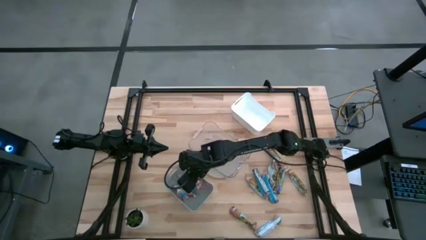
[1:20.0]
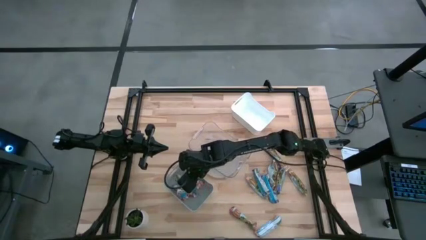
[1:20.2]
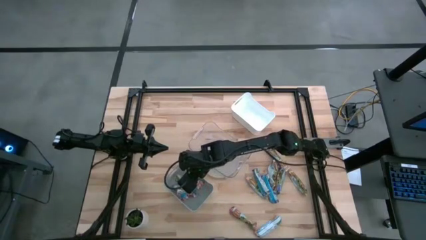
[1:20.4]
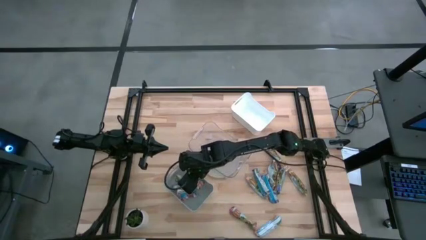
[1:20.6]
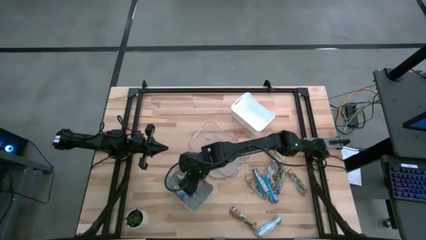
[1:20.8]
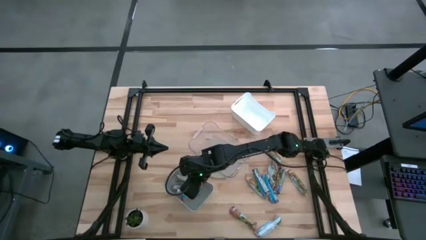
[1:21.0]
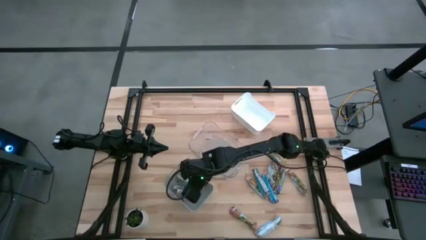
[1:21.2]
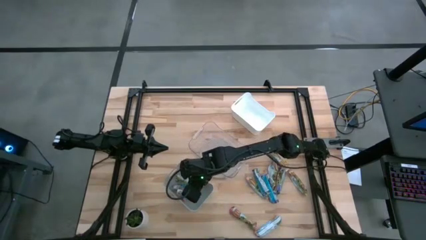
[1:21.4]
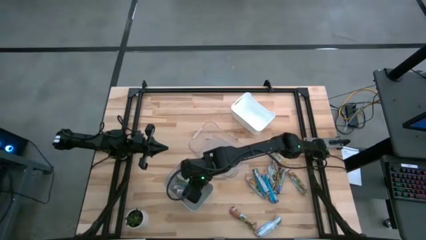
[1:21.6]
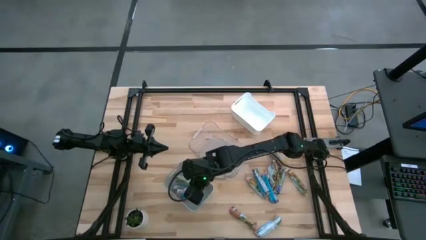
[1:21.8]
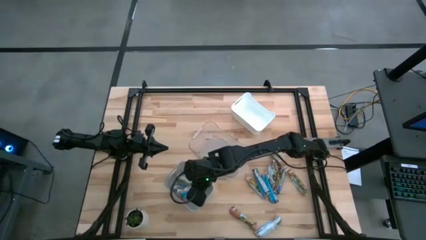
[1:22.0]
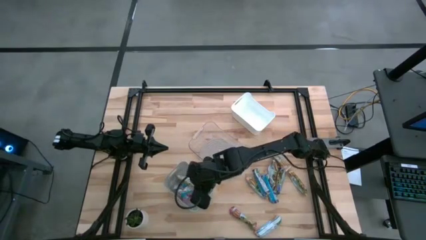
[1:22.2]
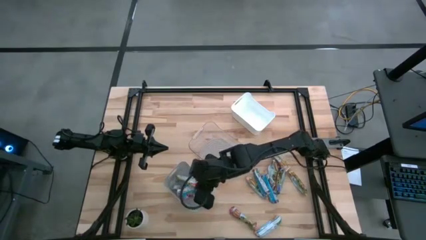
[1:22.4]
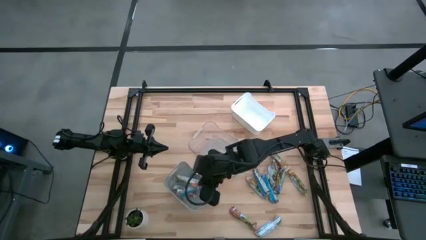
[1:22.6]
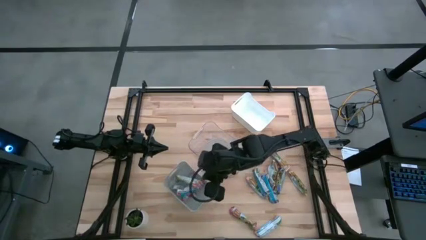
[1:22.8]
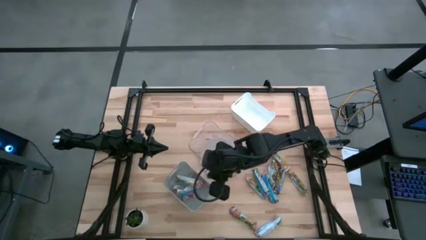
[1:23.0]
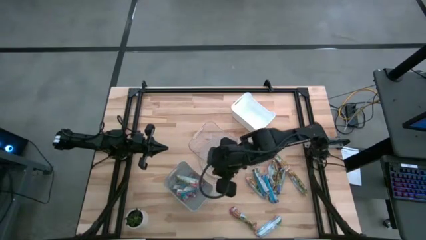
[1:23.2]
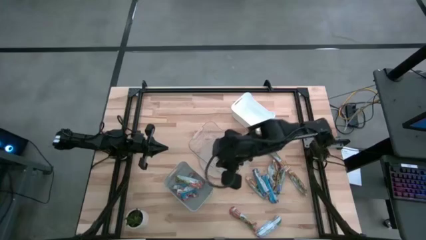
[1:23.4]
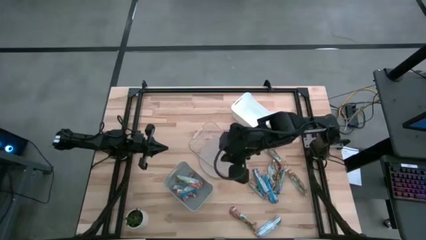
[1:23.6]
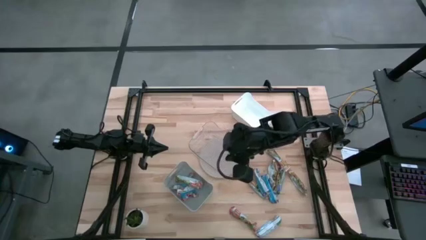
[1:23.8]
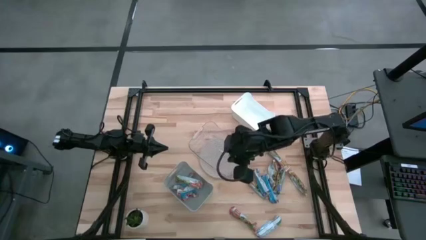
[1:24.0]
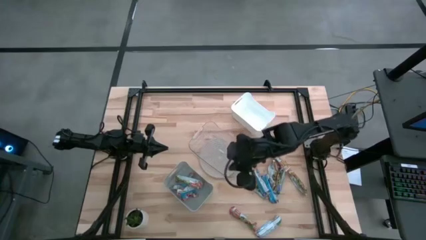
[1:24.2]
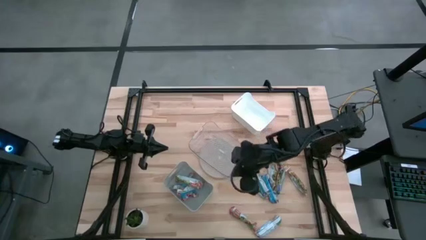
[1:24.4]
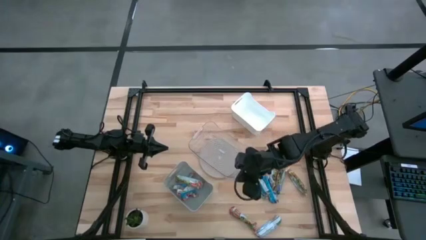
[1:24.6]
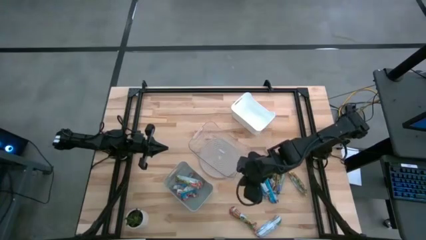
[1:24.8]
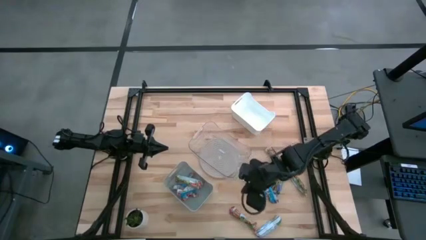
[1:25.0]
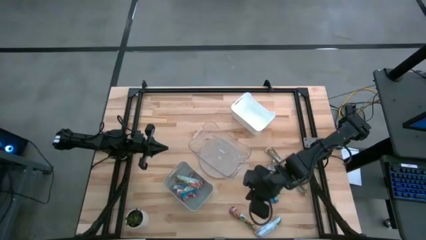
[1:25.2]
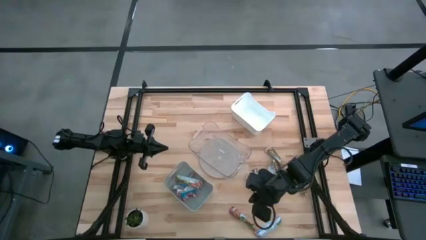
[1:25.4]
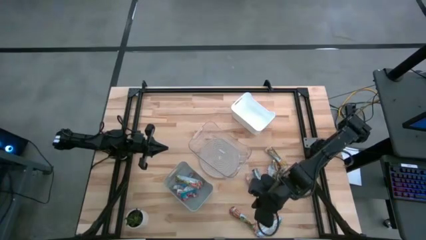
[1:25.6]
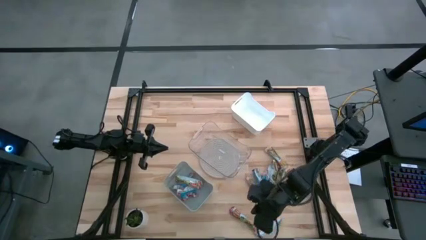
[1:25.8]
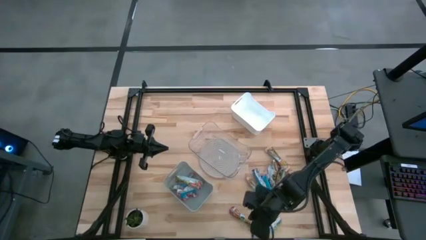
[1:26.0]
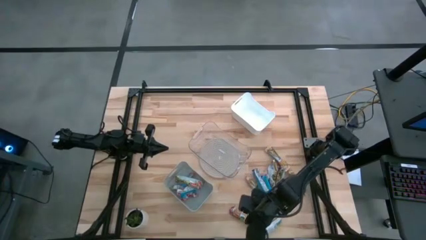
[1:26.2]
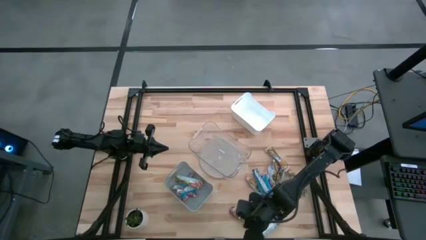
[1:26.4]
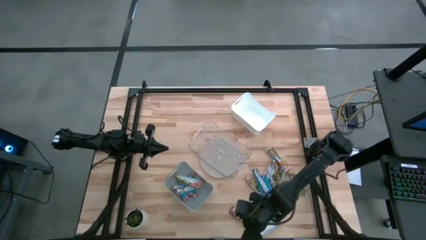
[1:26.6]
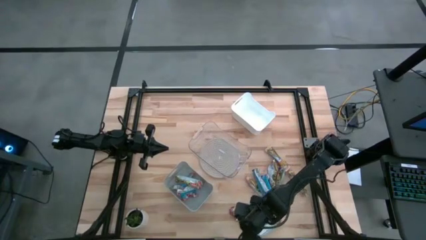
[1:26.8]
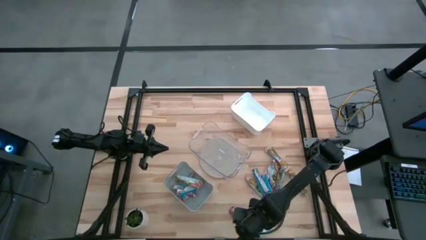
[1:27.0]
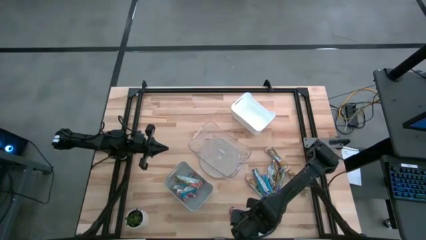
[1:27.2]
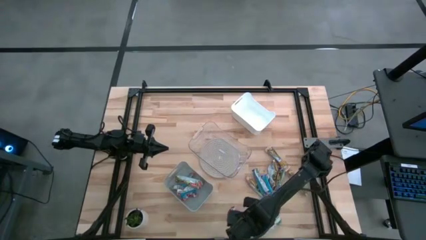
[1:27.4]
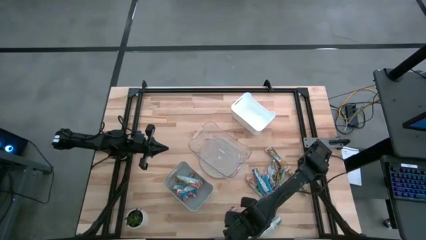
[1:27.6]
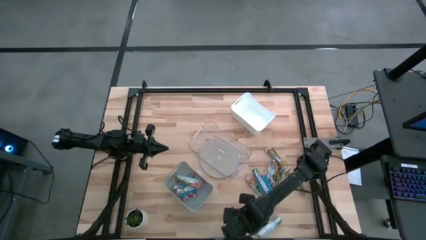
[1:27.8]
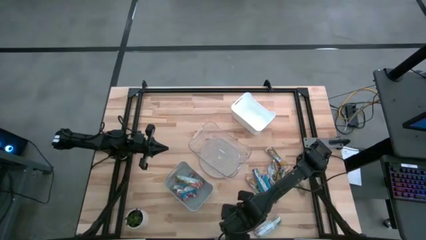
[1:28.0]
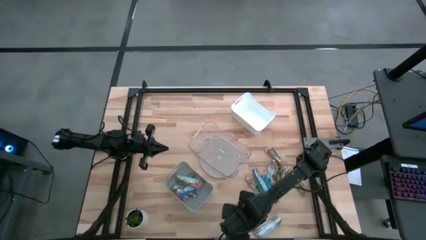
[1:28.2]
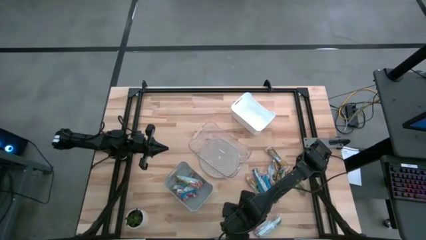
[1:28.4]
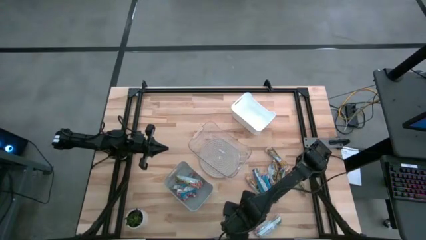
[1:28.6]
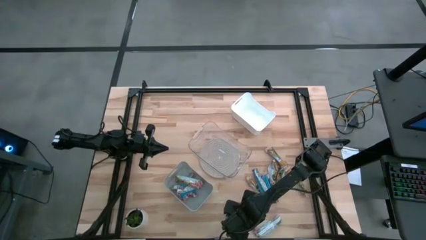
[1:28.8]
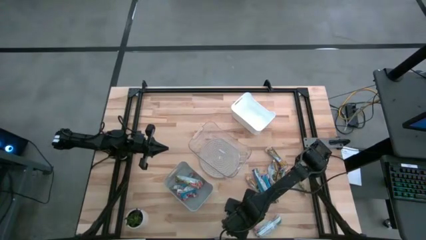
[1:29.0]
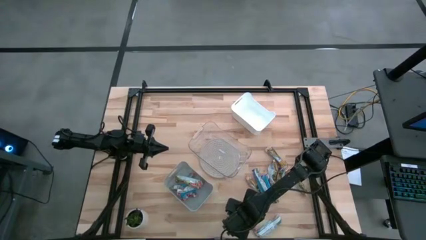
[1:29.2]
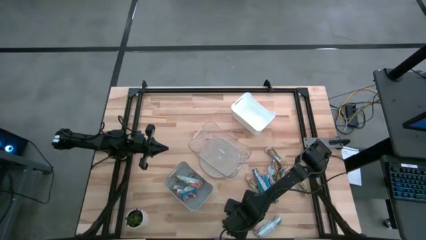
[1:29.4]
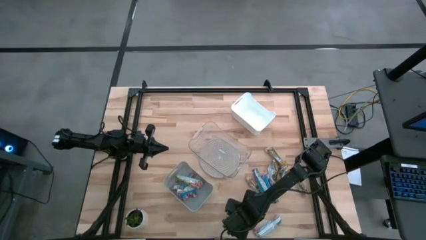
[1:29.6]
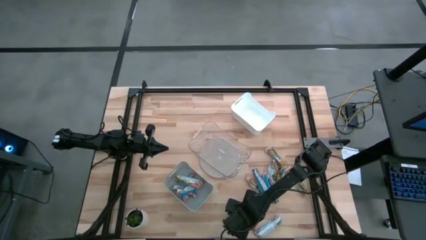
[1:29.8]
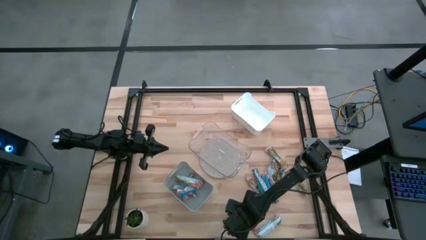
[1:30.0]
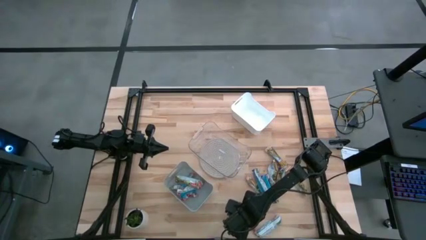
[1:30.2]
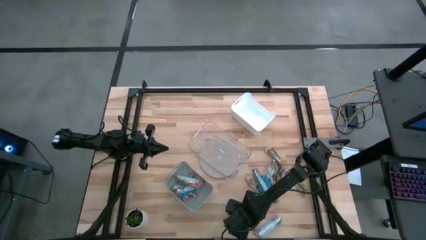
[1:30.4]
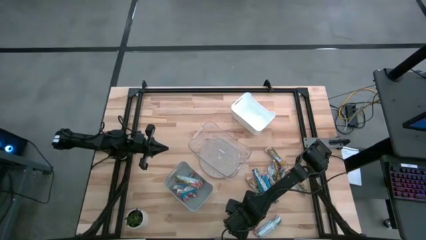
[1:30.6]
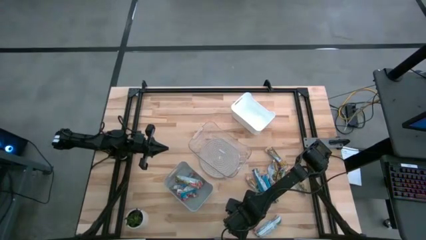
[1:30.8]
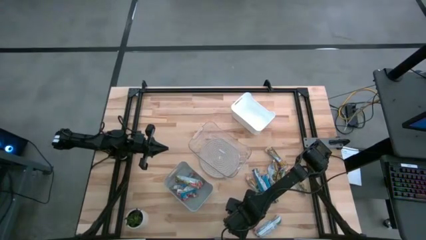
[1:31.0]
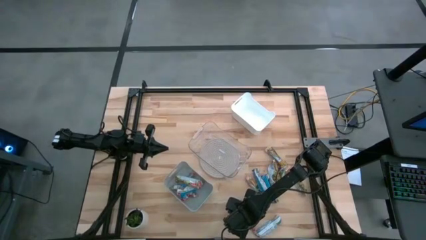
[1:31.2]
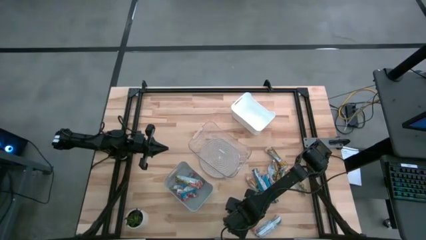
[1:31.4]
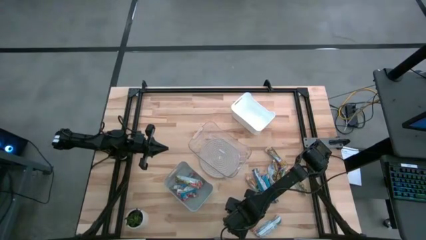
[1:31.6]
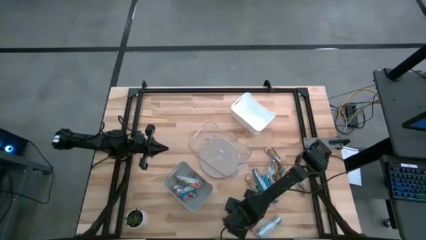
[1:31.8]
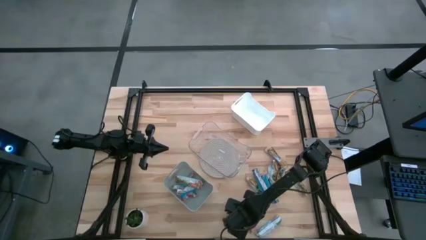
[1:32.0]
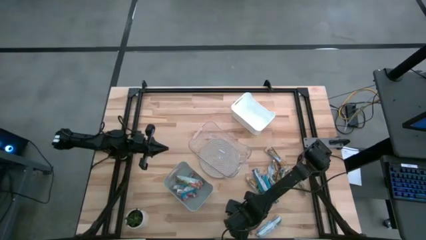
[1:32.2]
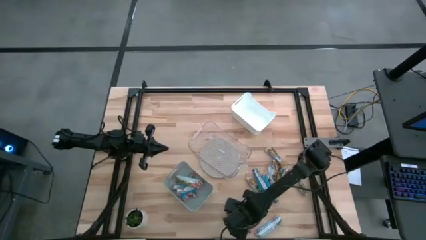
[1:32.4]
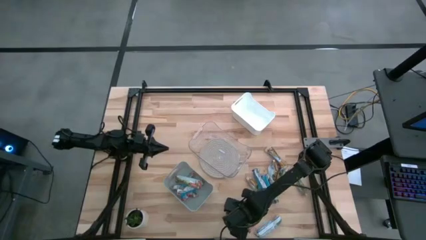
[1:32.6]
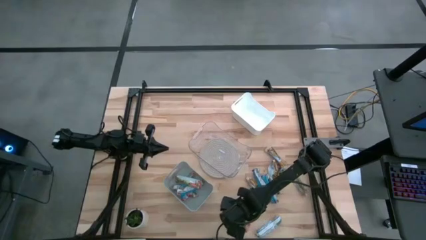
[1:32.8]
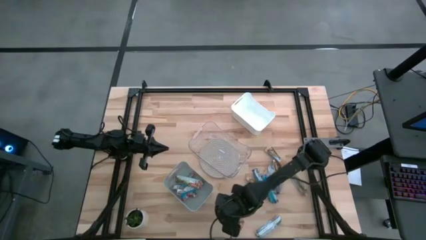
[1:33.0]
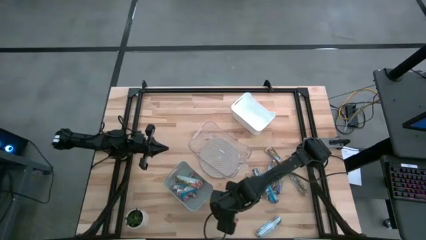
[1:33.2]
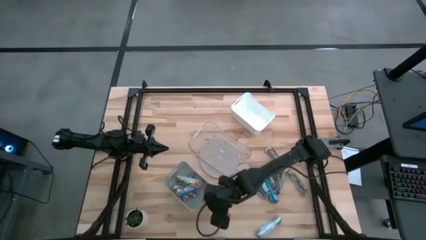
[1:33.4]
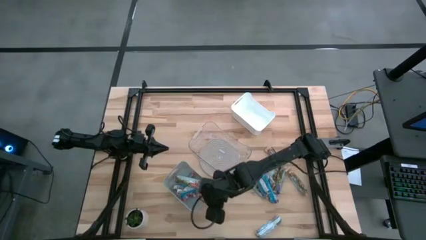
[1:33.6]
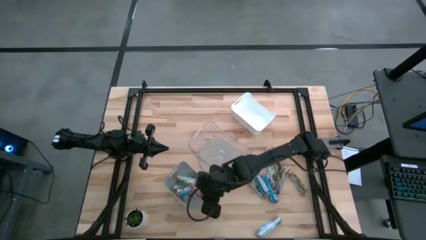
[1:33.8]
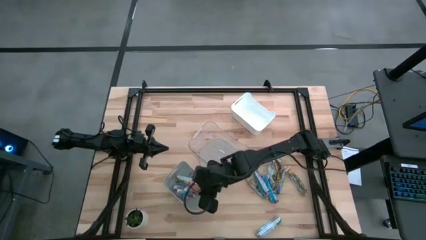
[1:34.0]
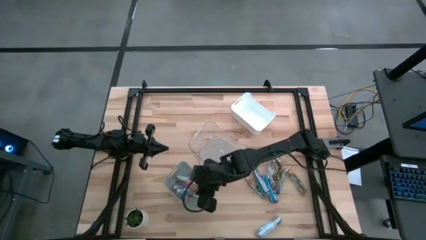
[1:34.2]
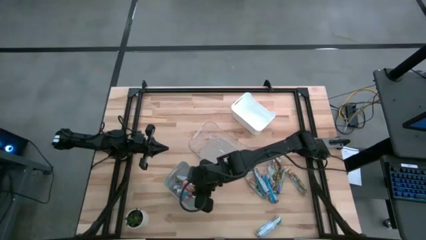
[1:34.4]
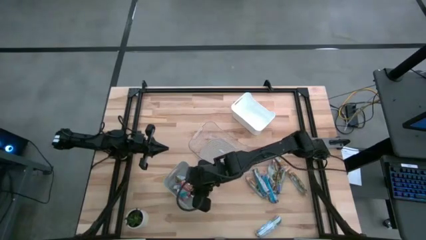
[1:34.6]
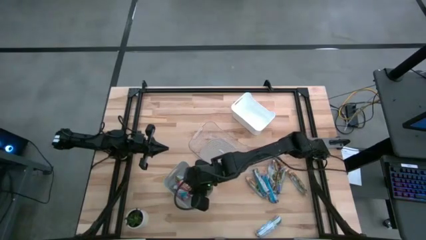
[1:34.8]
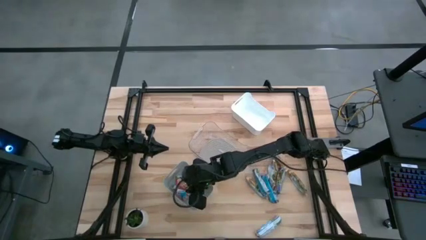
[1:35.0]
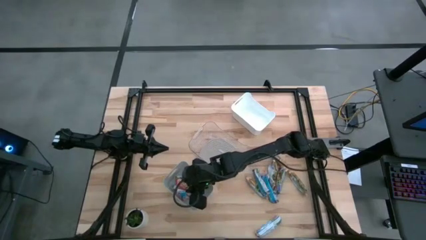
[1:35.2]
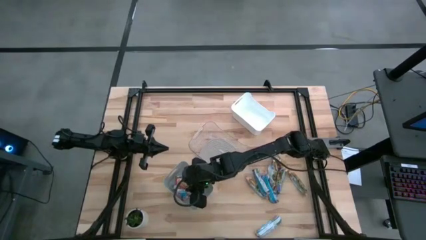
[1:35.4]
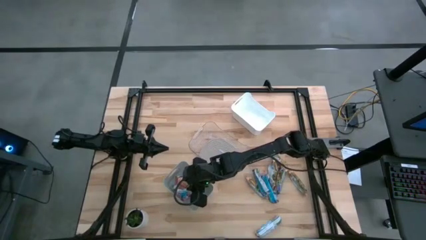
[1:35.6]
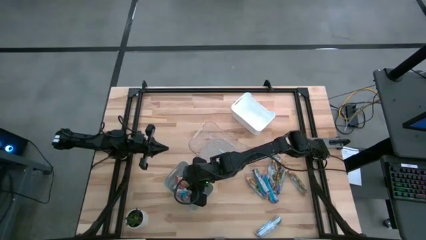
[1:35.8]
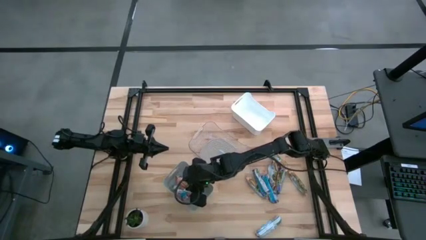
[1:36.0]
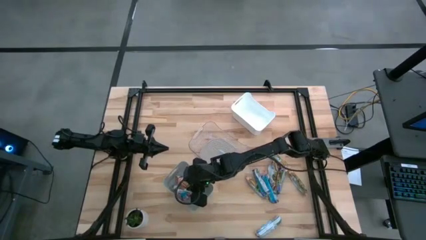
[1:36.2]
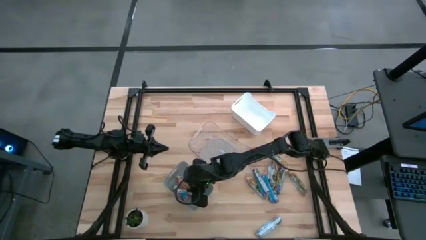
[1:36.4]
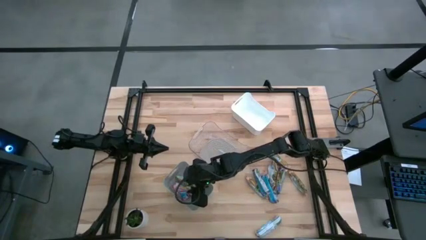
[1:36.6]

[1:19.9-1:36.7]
Task: Pick and place Granola Bars by type
Put the red granola bar into the gray bin
